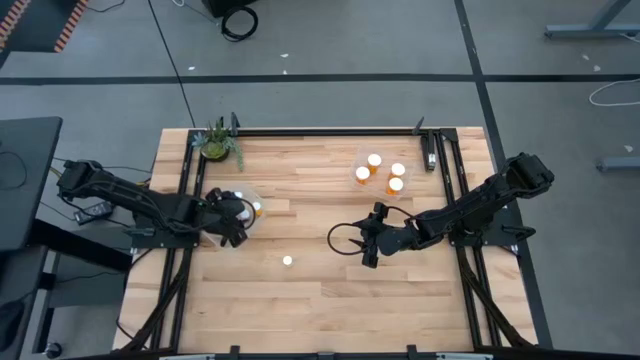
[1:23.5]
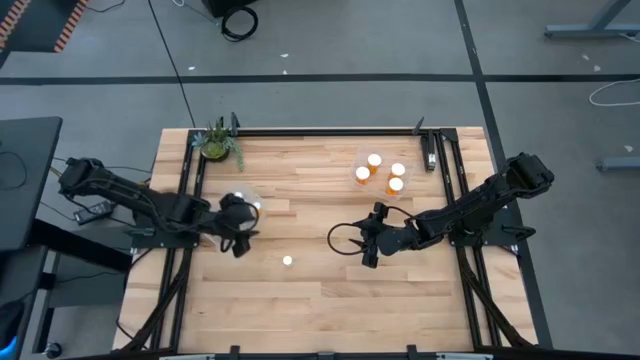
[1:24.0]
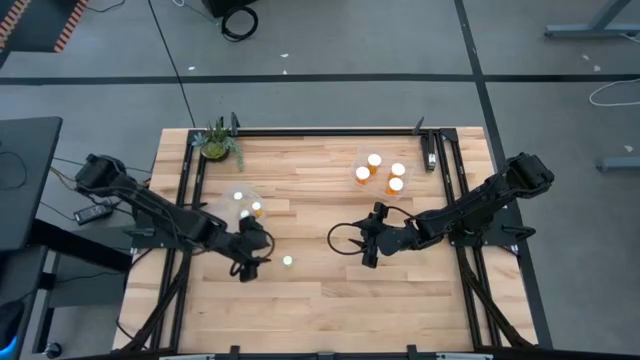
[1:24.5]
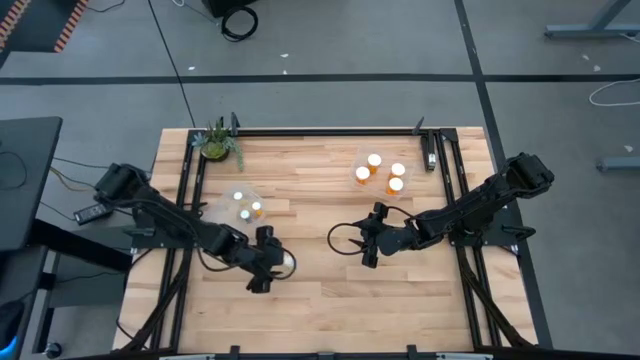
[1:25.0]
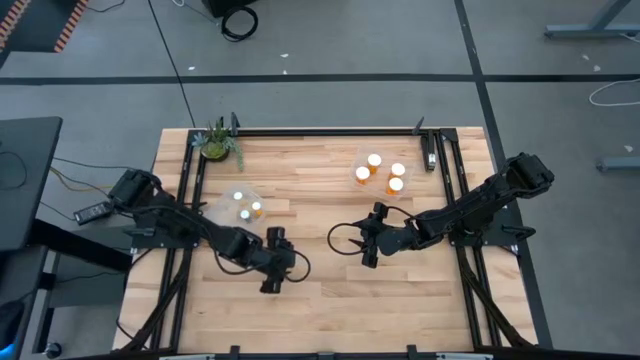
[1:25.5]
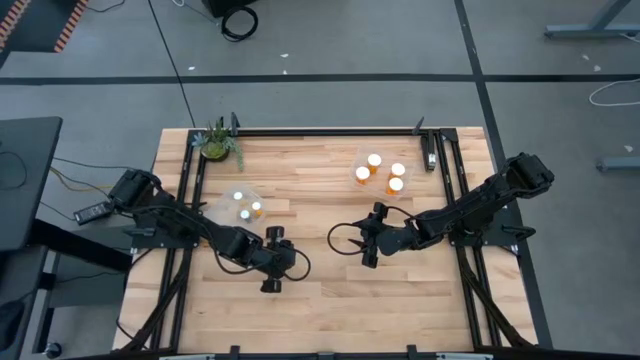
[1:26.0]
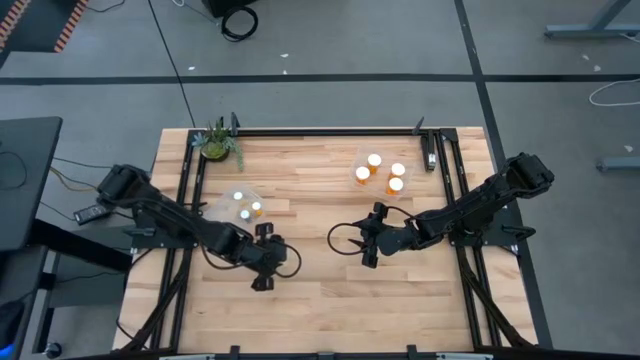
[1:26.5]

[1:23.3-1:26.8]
Task: Pick and place medicine bottles into bin by pill shape (circle, oval)
Put the small yellow pill bottle into the left transparent bin

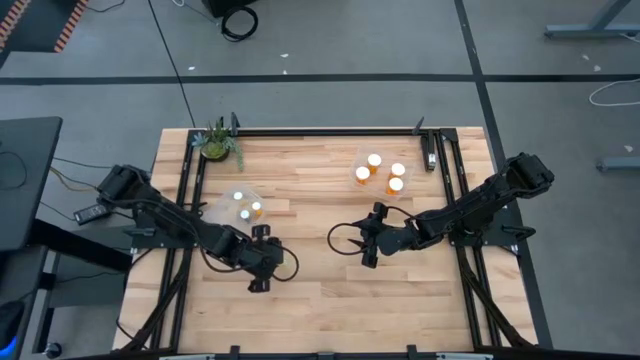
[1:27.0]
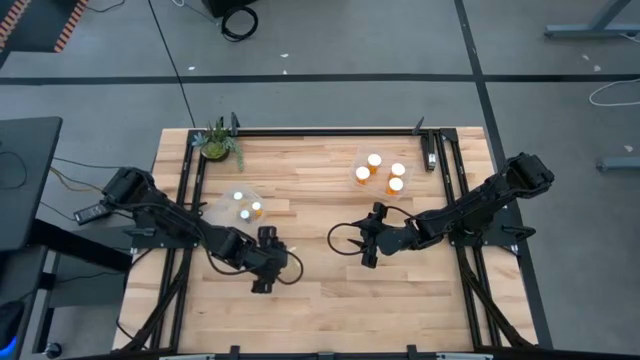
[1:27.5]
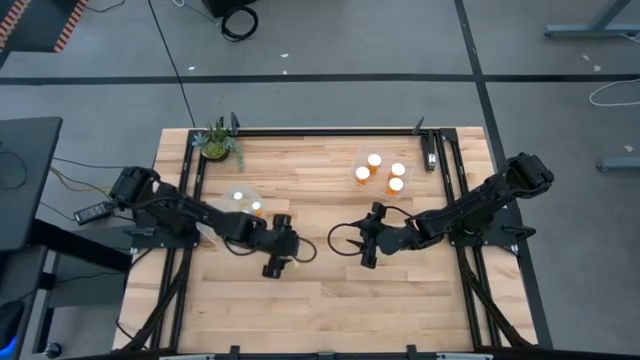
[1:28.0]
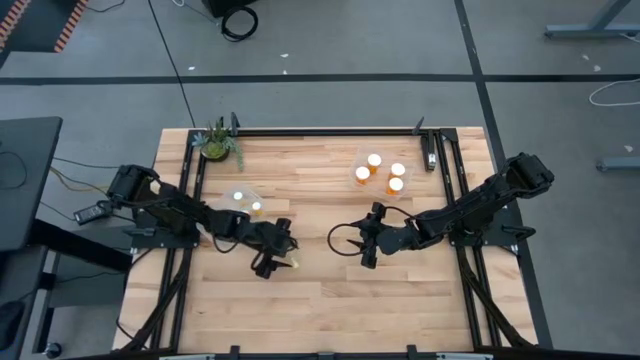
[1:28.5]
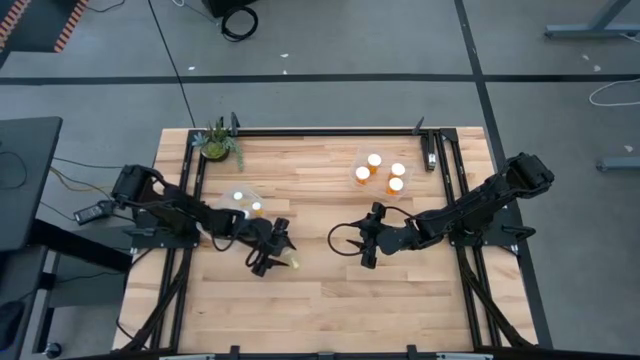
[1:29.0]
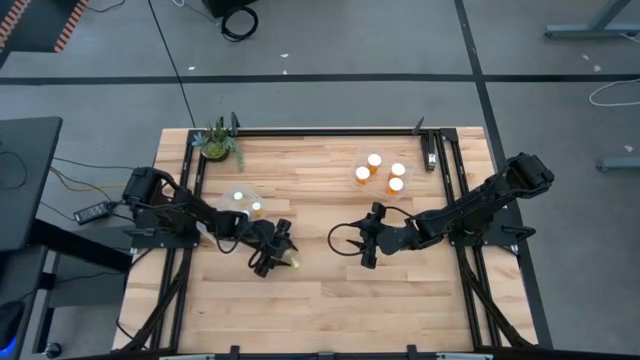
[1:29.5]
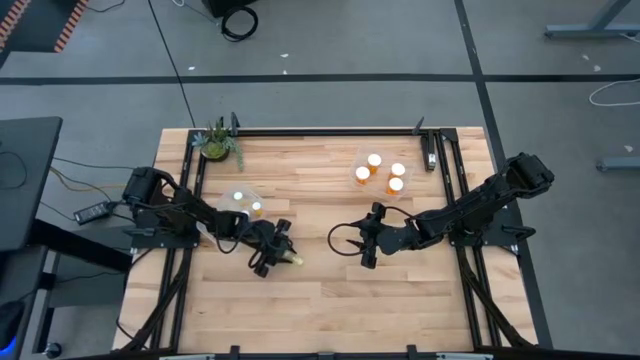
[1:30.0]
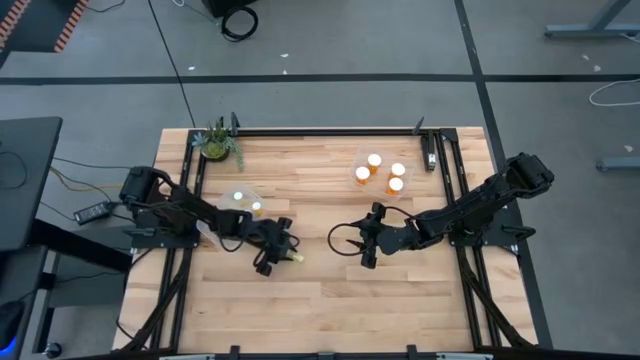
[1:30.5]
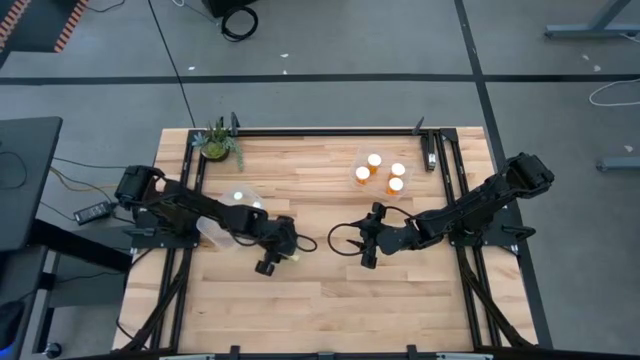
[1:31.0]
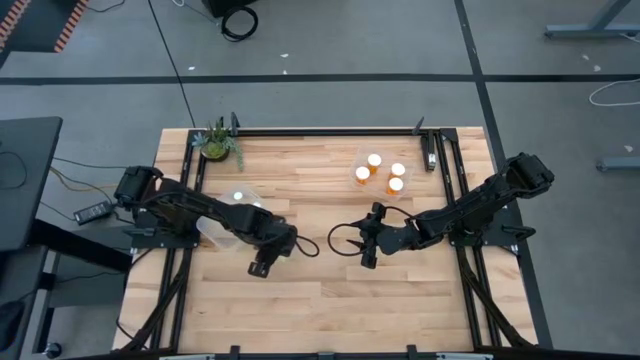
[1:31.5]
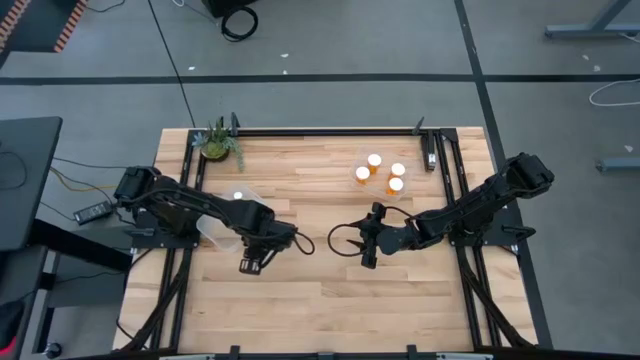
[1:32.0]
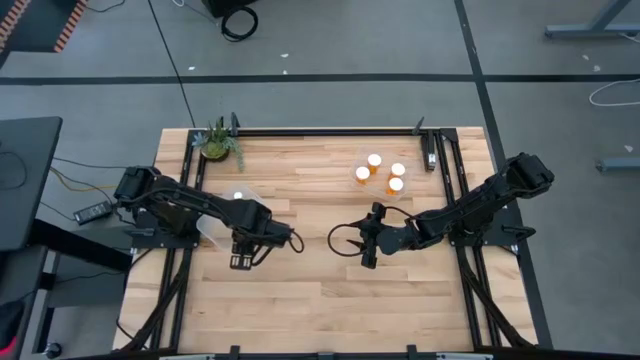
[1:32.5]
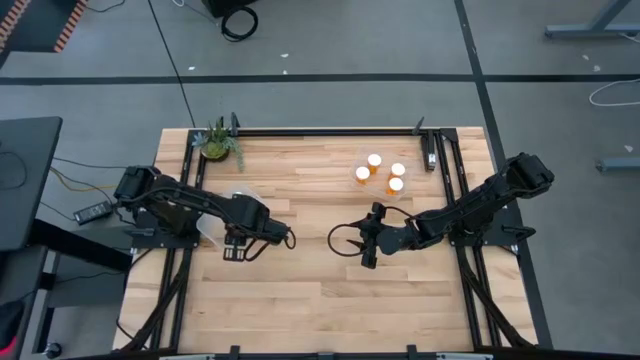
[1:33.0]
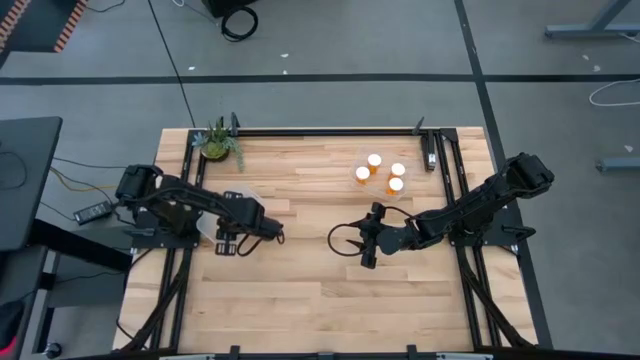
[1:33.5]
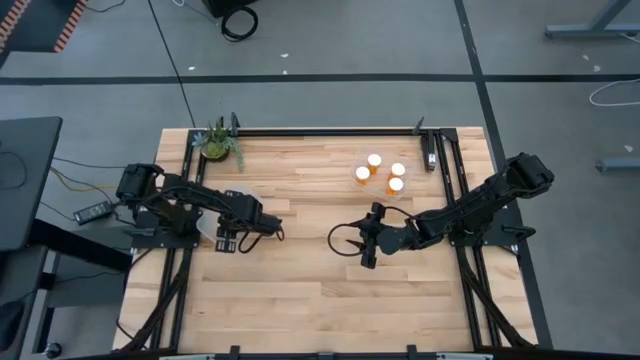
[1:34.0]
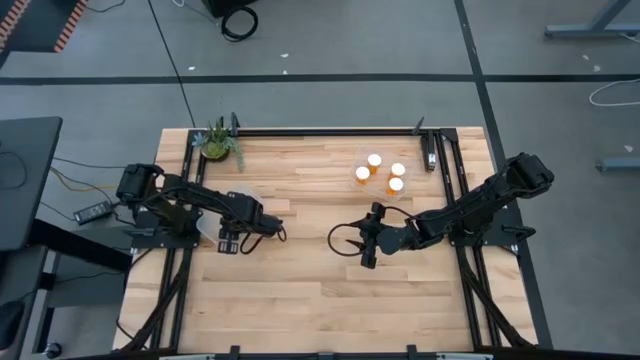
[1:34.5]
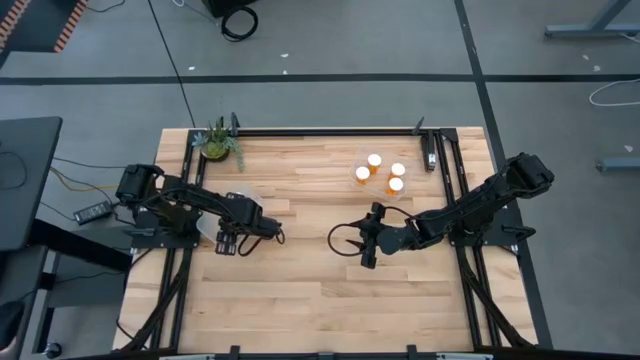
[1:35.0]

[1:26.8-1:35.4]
Put the small yellow pill bottle into the left transparent bin

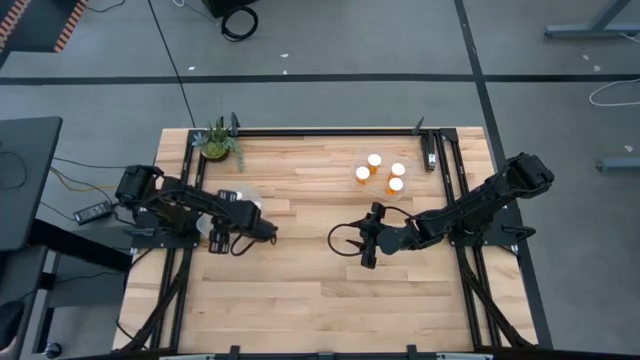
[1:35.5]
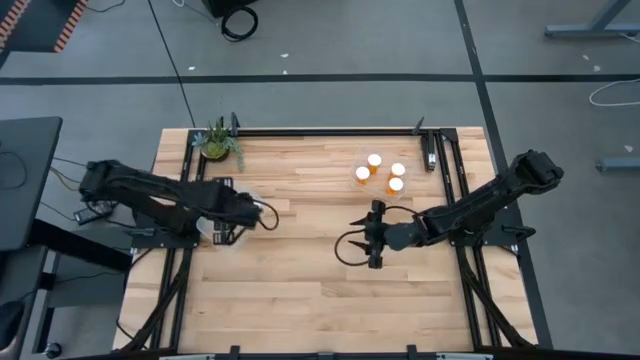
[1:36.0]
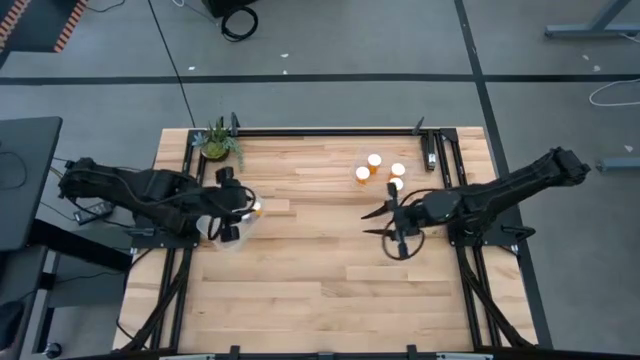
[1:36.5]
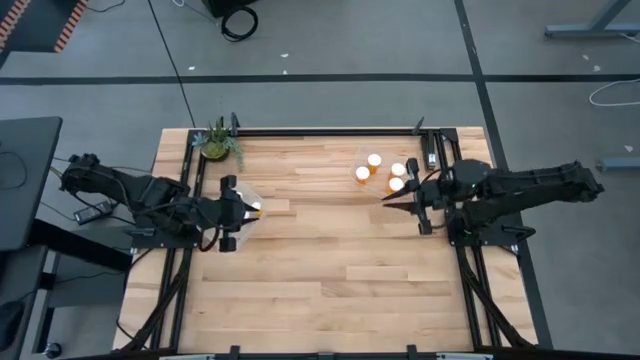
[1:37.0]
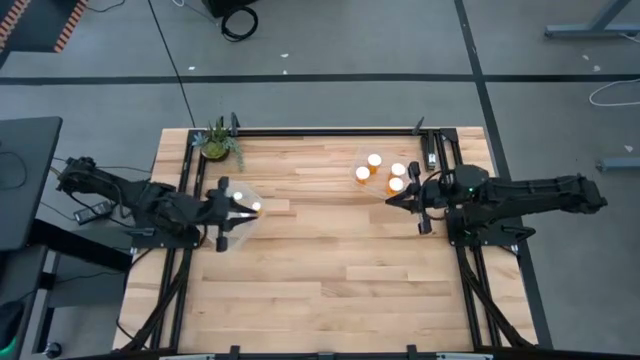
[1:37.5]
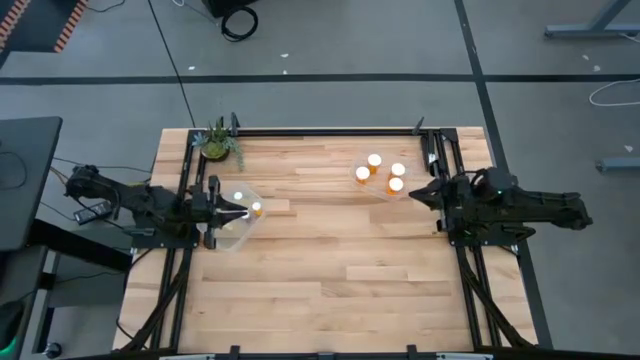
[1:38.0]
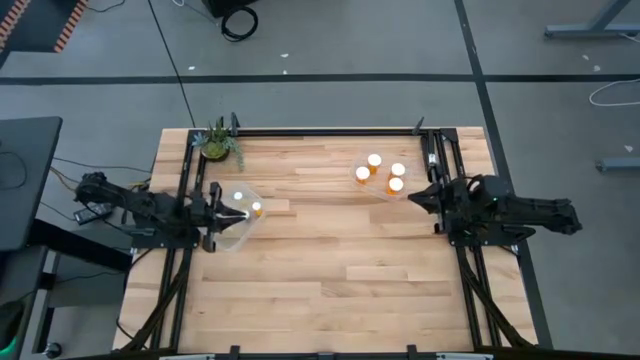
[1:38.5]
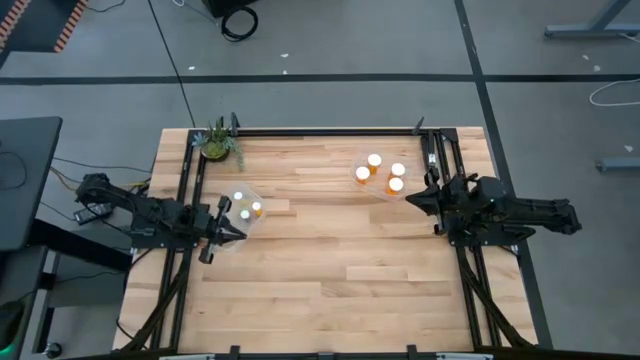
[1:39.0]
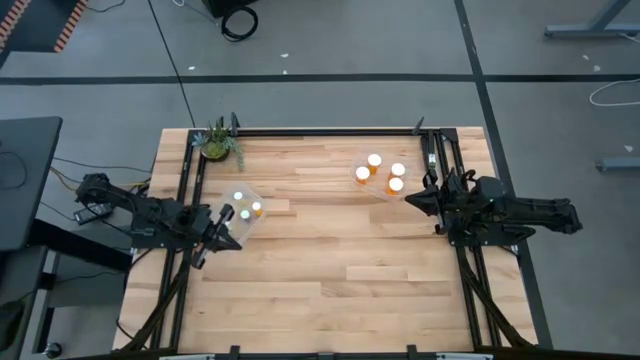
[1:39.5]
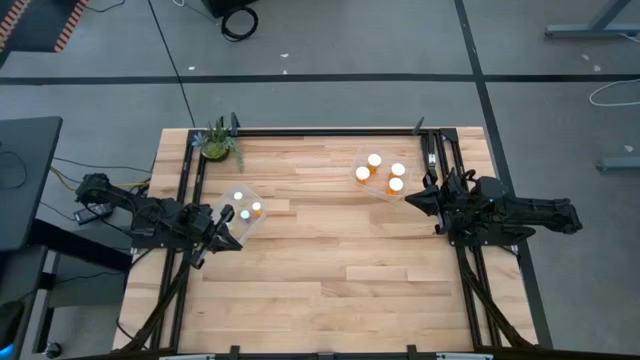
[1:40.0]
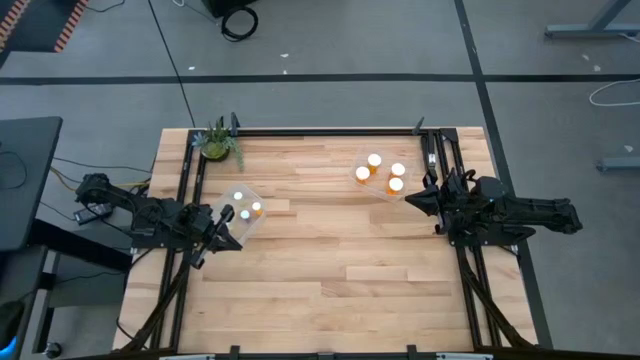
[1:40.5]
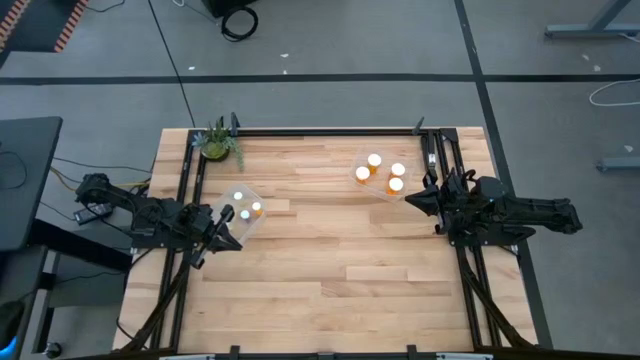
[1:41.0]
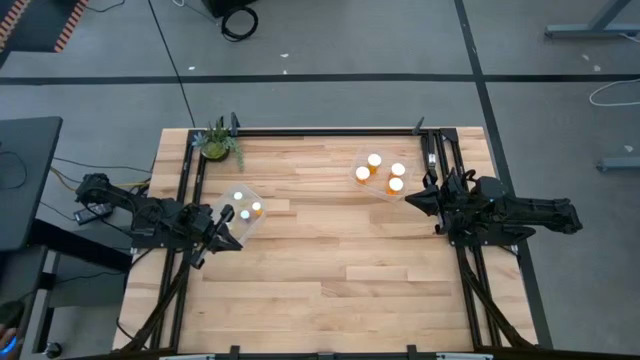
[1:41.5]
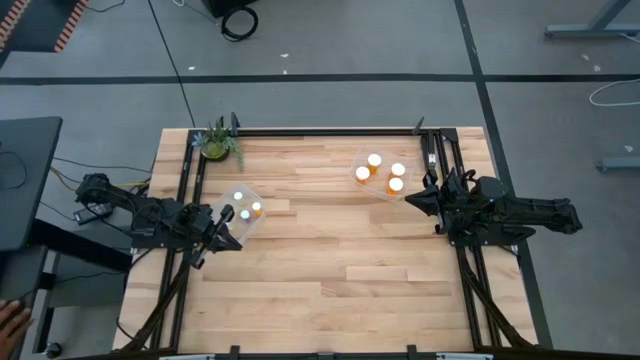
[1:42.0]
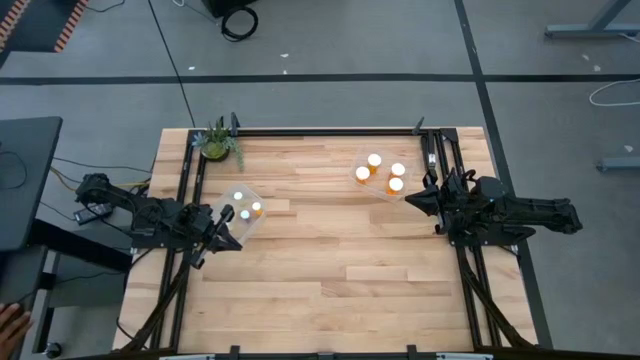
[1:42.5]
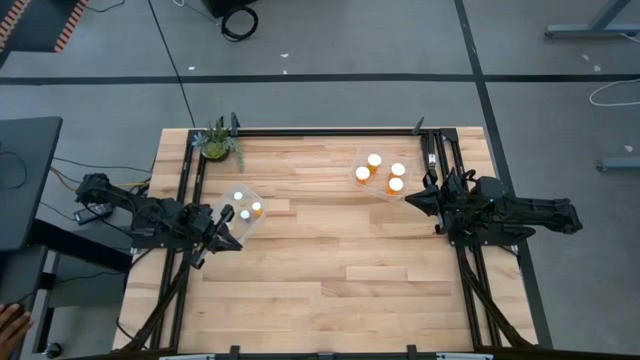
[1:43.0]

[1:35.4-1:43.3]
Return to Home Position

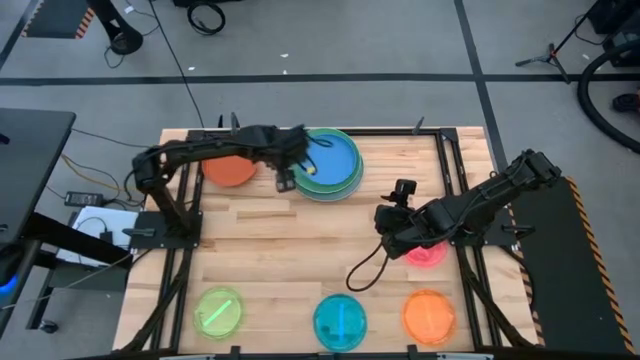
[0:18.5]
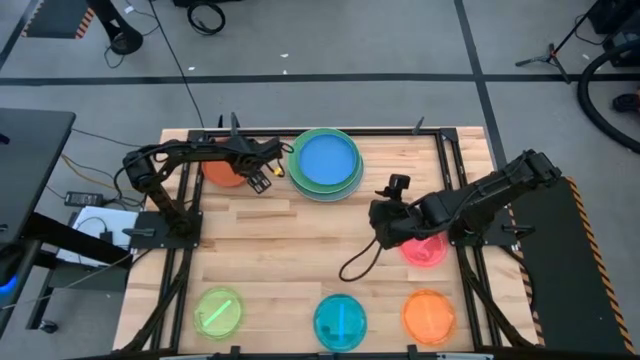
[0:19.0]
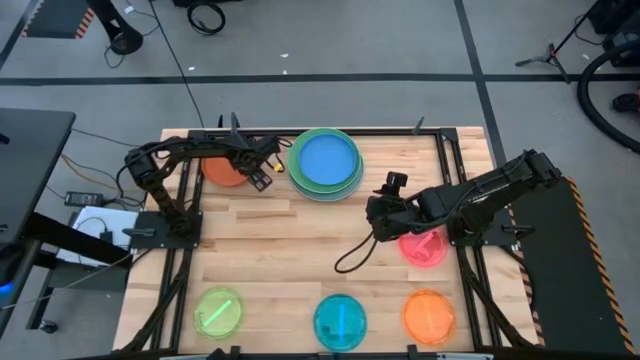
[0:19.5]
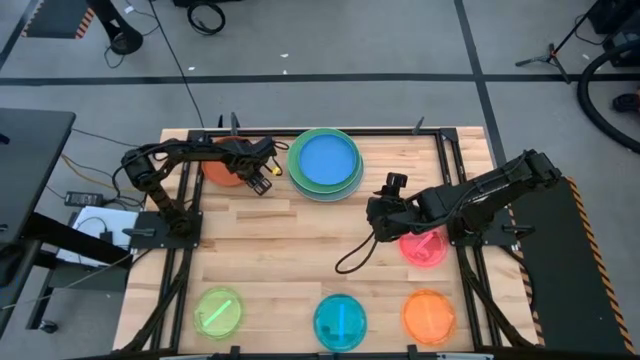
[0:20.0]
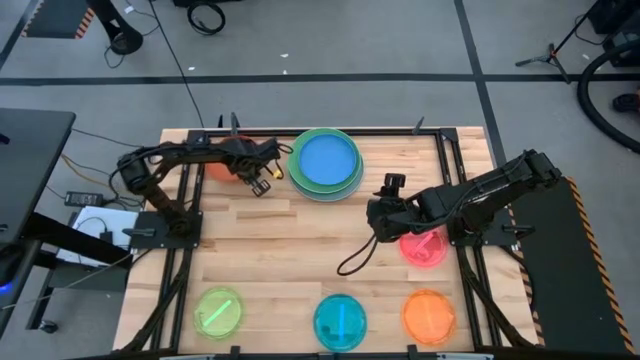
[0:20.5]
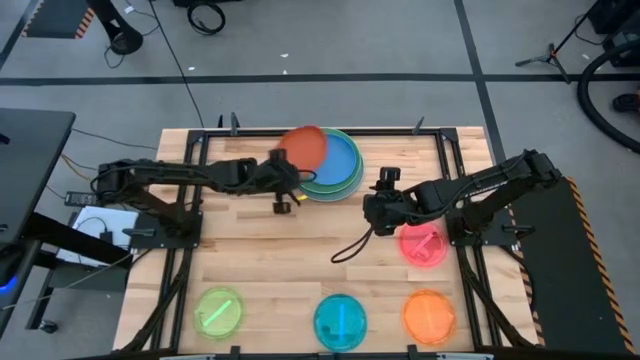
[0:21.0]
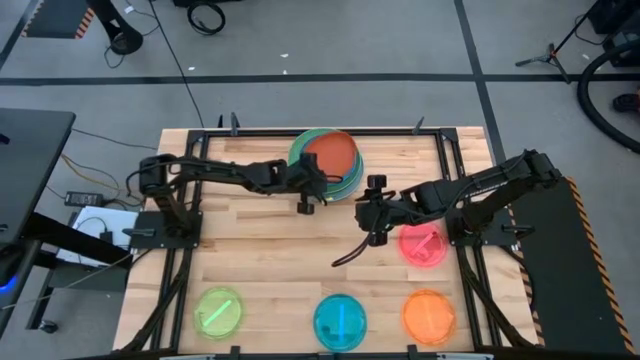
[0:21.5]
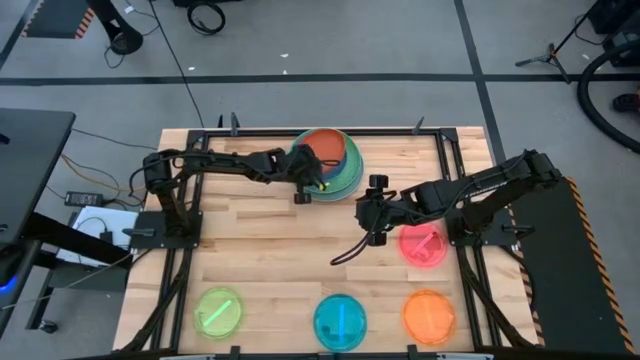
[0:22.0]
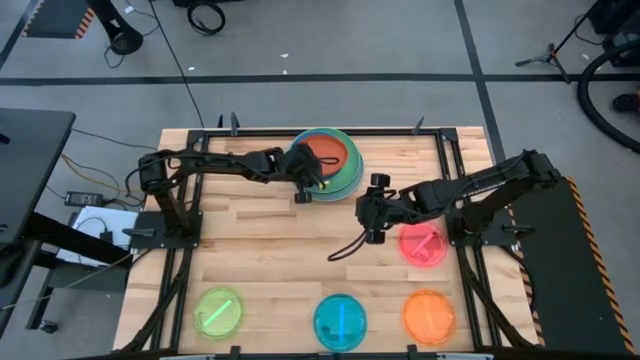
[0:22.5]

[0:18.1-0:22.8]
Task: Stack plastic plates
Stack the orange plate on top of the dark blue plate
